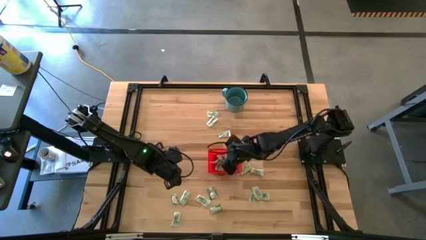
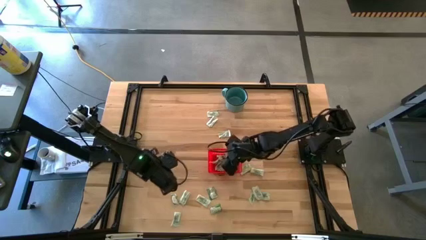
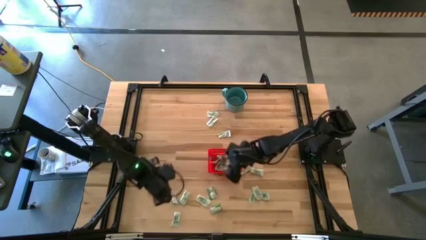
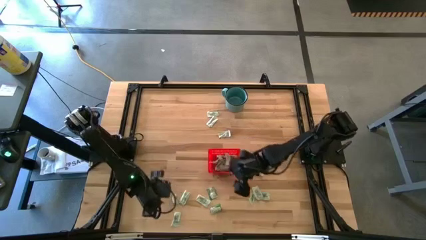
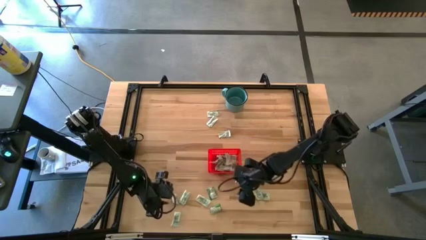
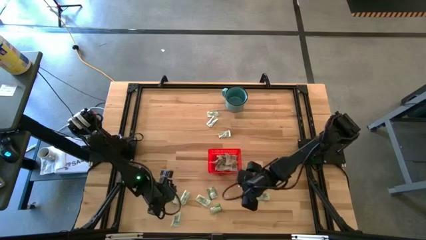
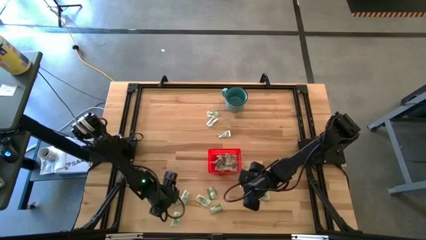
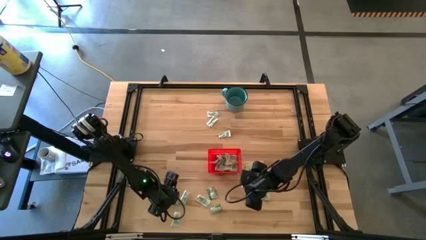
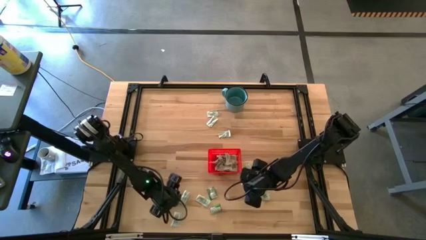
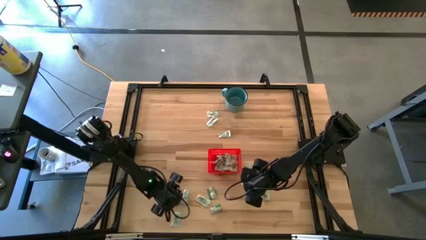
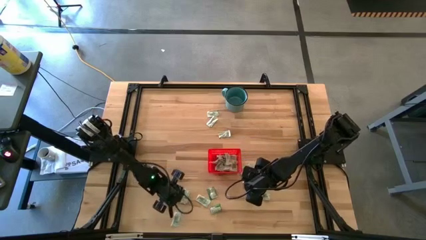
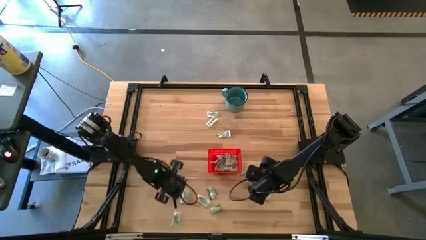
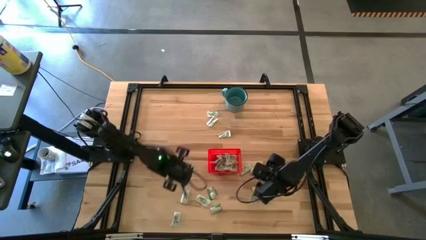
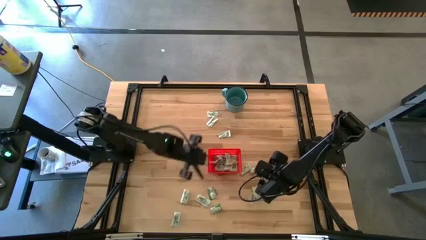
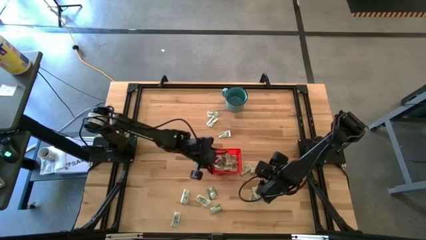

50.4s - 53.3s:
Task: Pick and place Stevia / Truvia into bins
Put the green truvia packet into the red bin

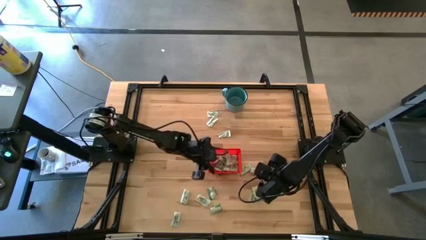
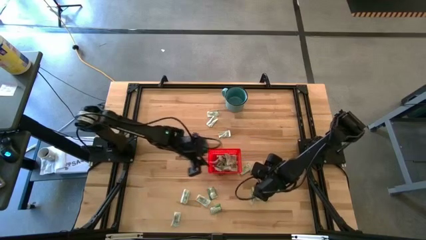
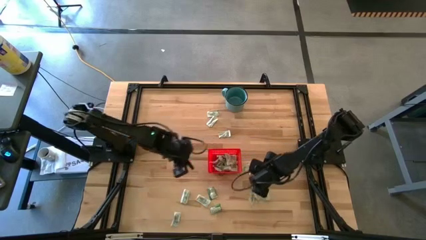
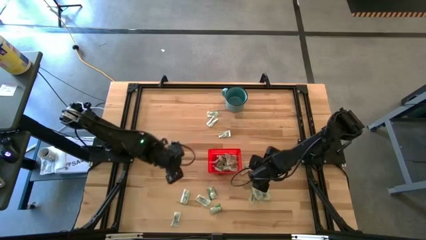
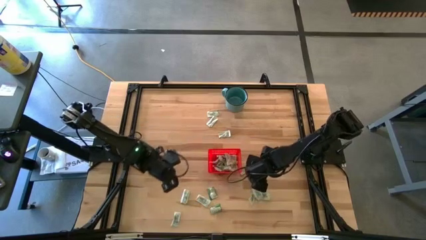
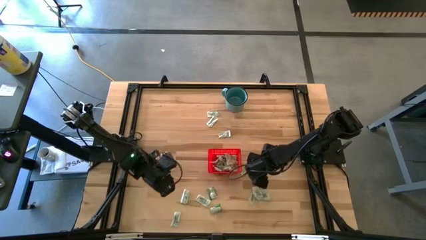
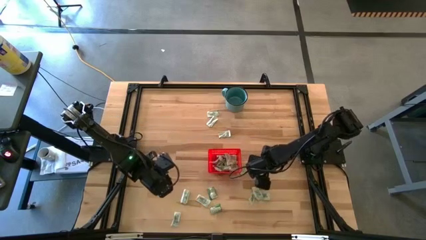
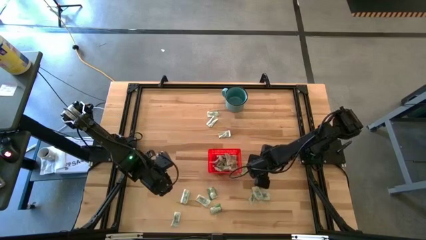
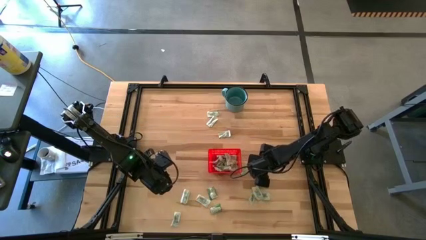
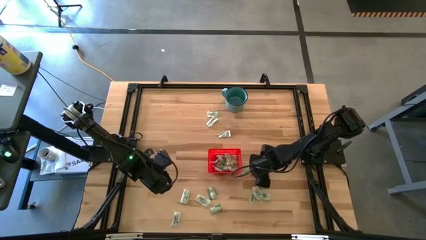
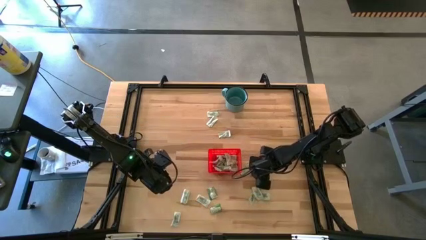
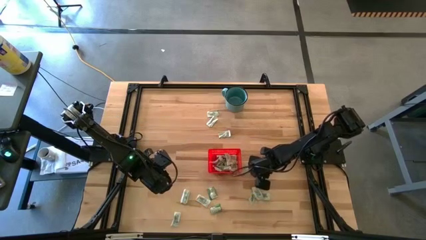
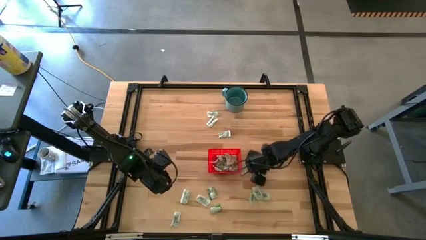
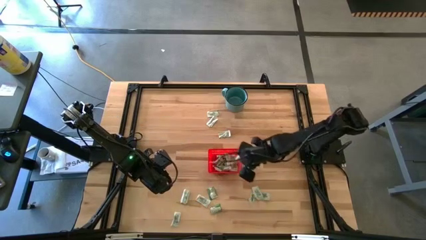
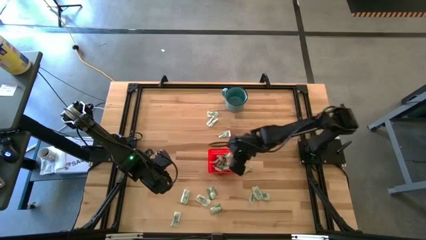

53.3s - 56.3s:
Put the green stevia packet into the red bin

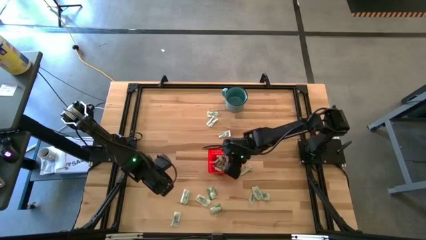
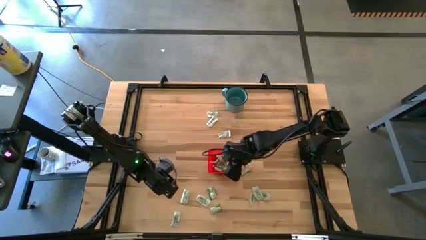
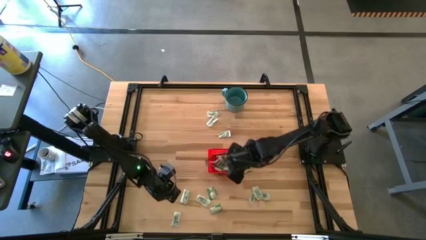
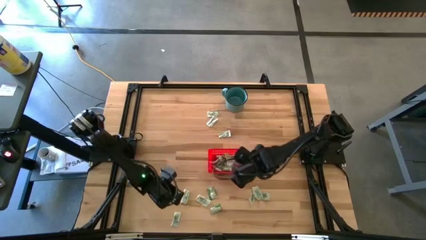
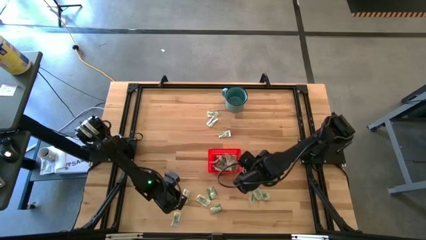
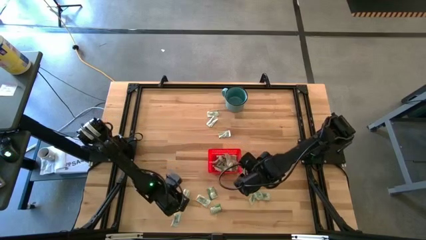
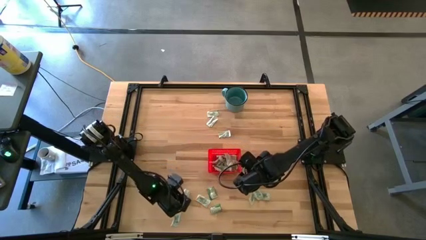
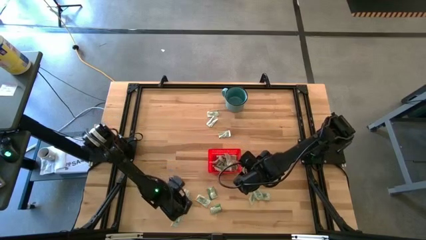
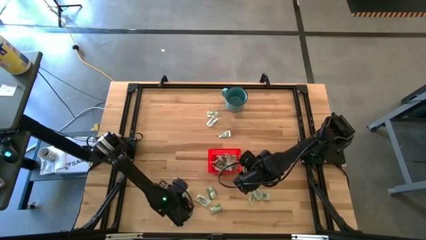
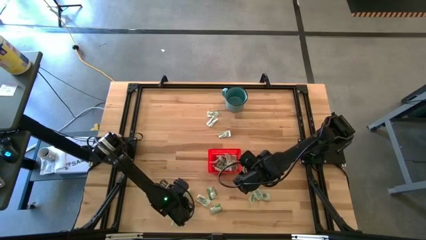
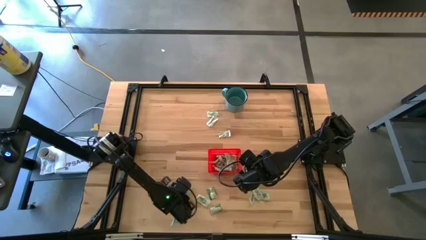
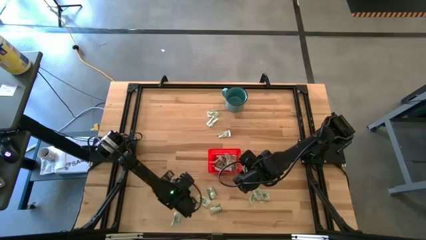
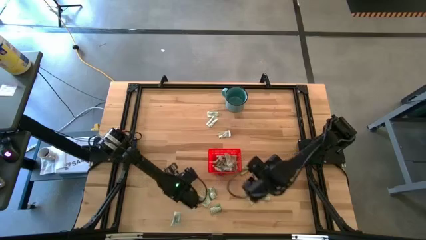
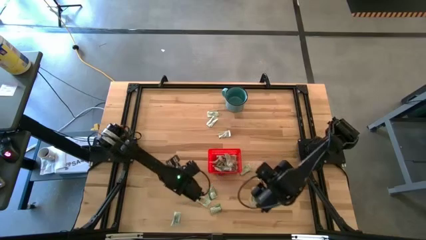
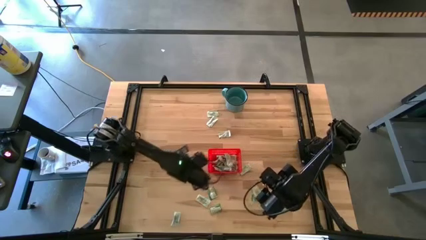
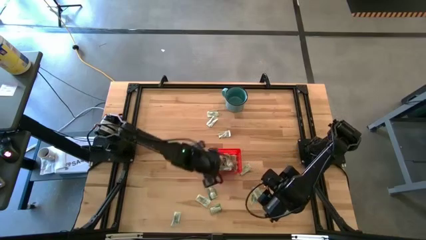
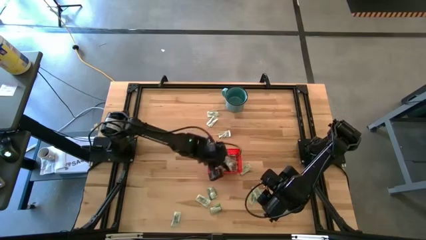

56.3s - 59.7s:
Put the green stevia packet into the red bin

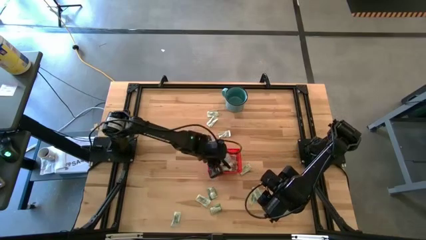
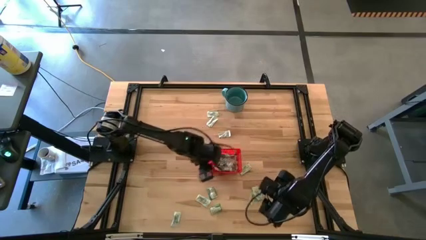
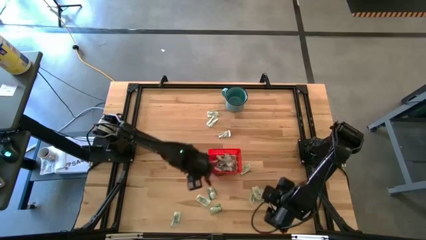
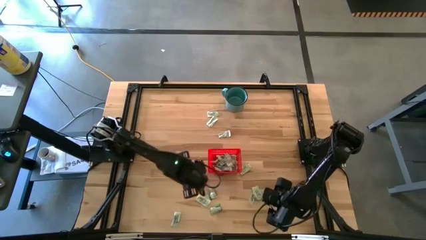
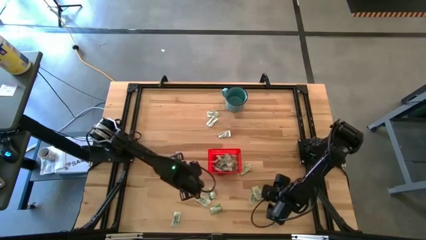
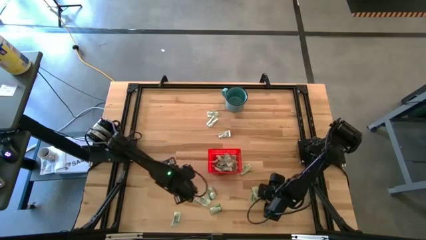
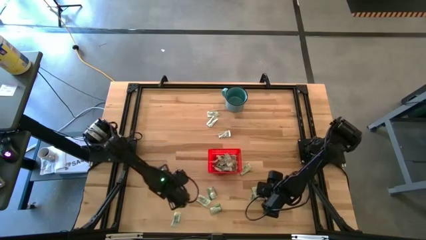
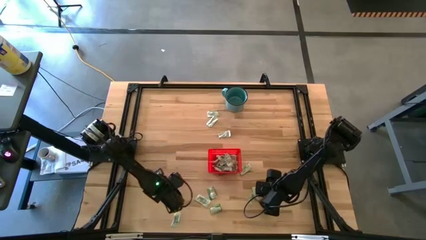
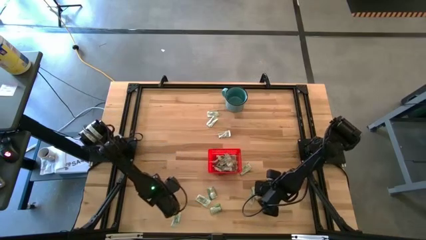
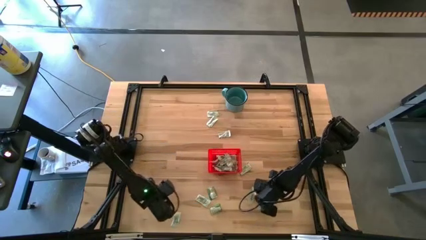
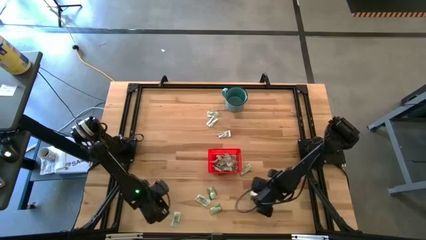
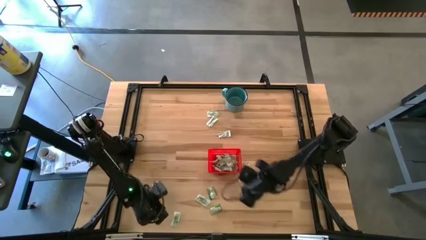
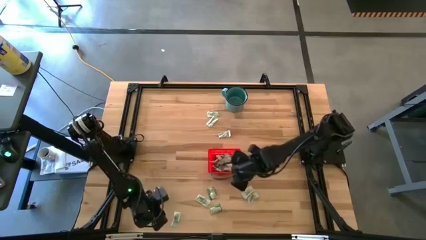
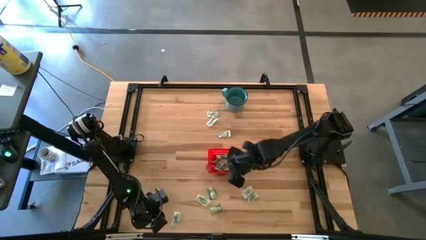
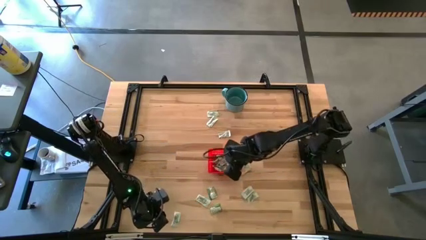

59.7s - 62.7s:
Put the green stevia packet into the red bin

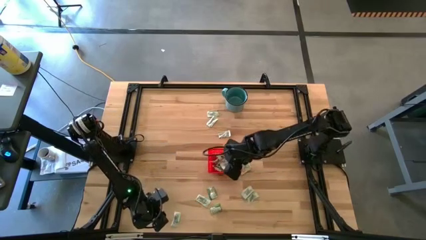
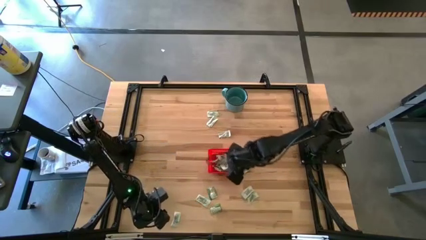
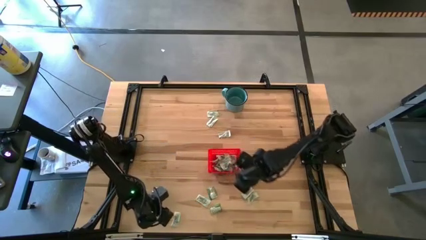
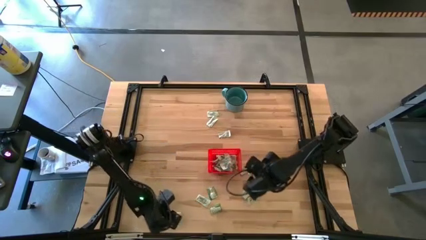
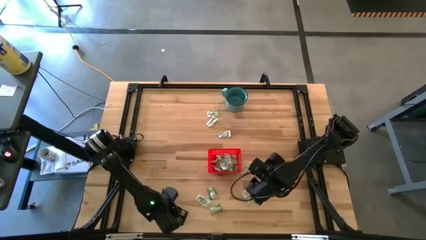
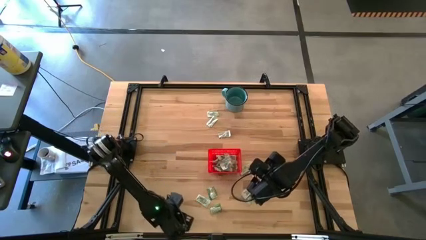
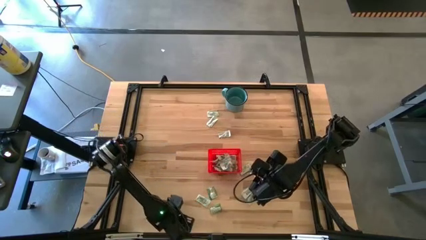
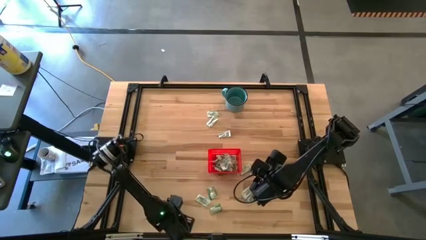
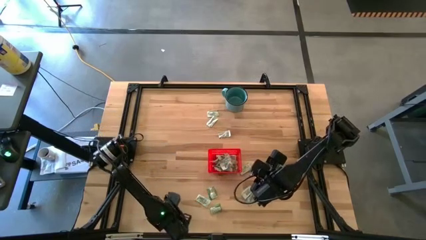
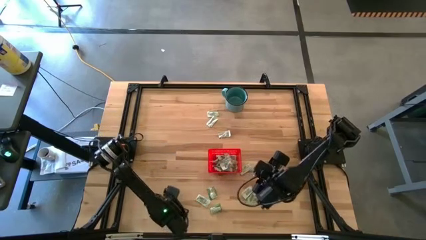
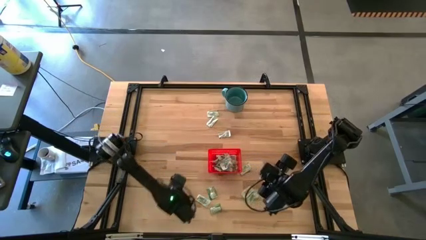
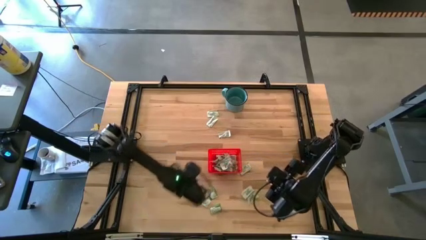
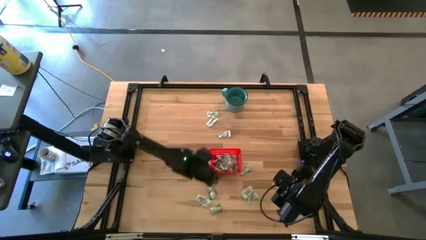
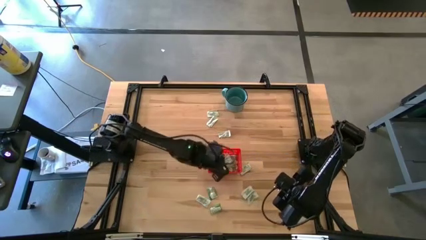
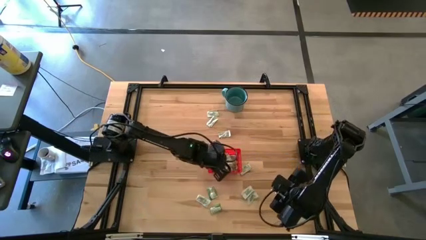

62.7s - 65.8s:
Put the green stevia packet into the red bin

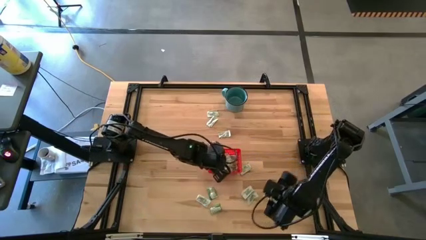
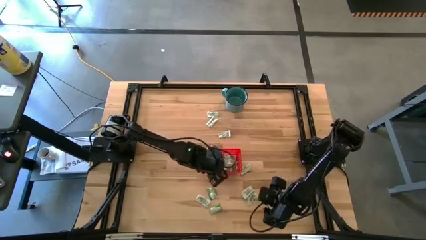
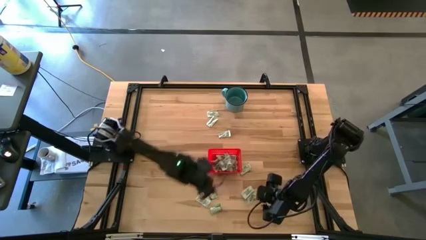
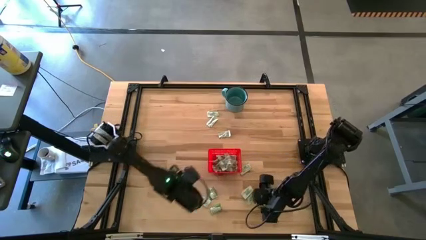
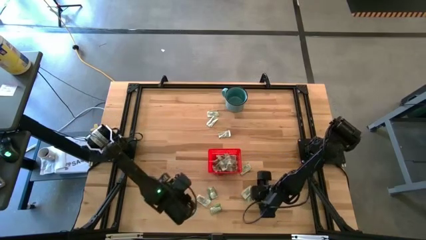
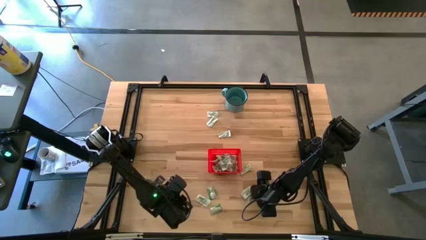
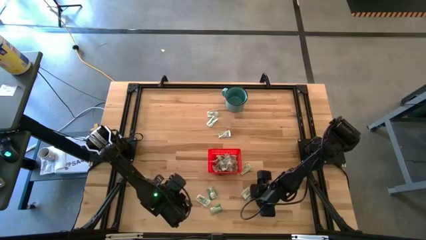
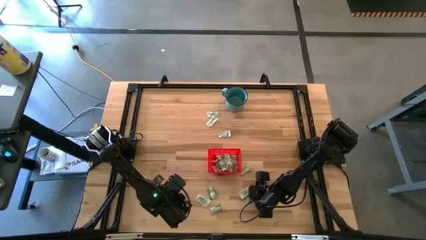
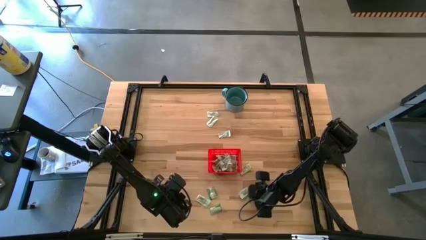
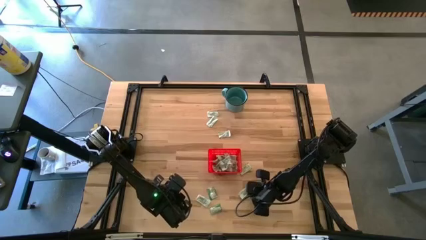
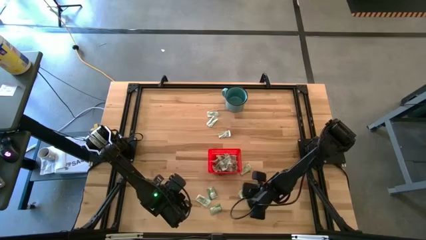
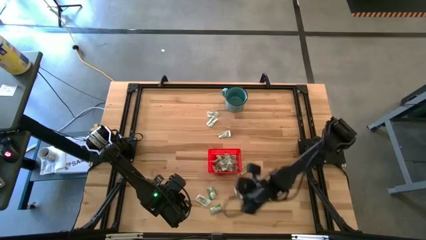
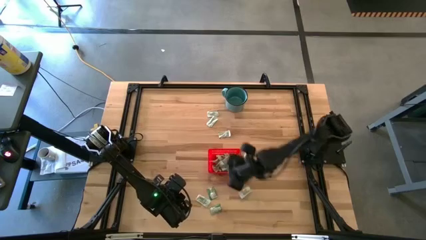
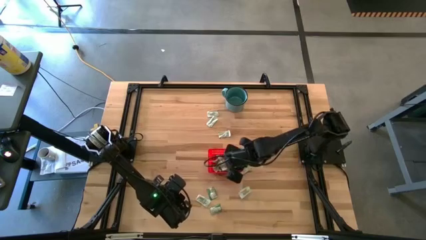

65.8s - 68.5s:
Put the green stevia packet into the red bin
